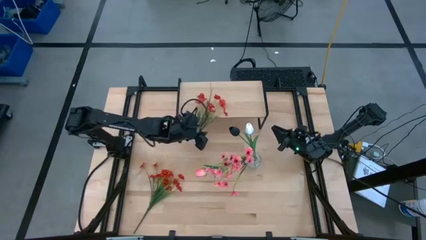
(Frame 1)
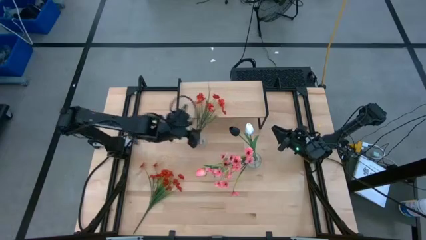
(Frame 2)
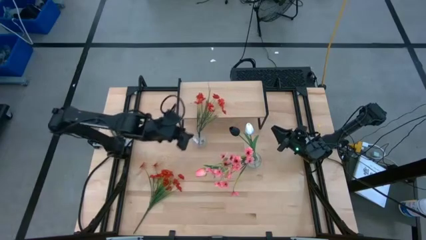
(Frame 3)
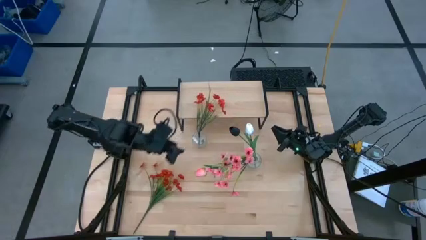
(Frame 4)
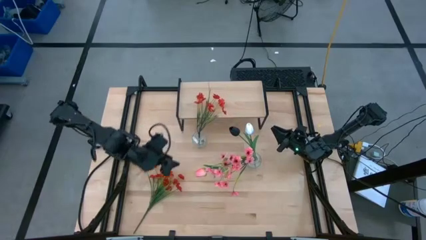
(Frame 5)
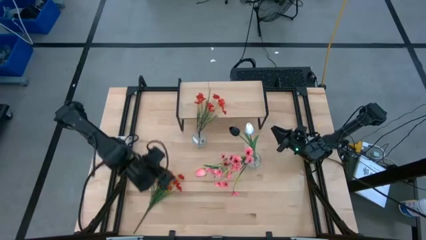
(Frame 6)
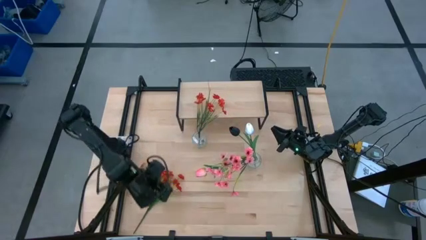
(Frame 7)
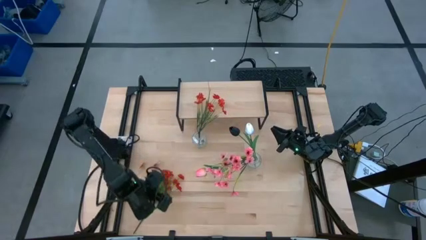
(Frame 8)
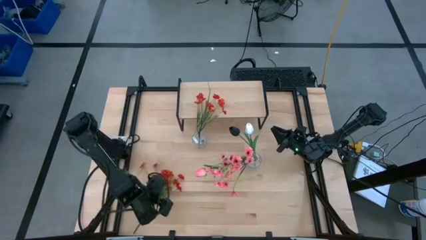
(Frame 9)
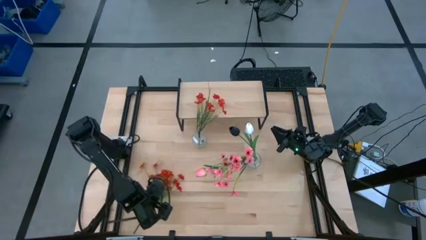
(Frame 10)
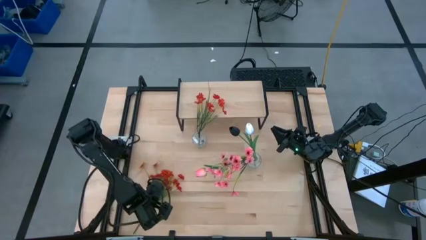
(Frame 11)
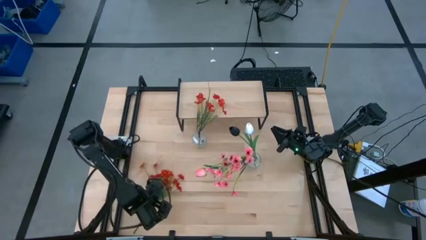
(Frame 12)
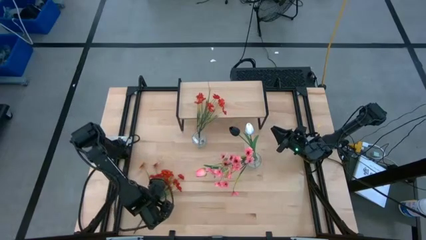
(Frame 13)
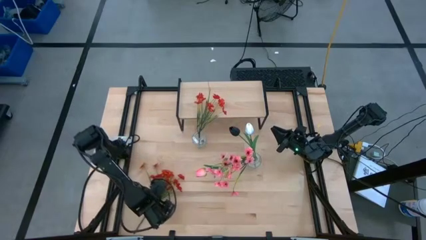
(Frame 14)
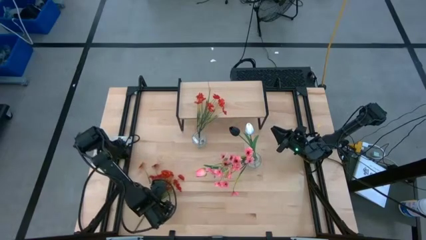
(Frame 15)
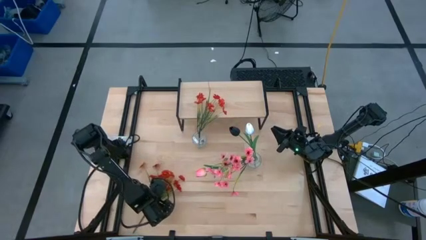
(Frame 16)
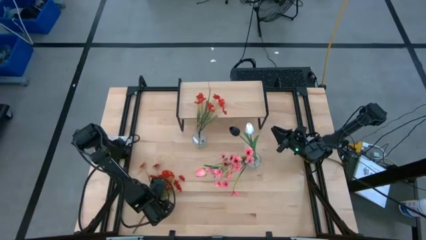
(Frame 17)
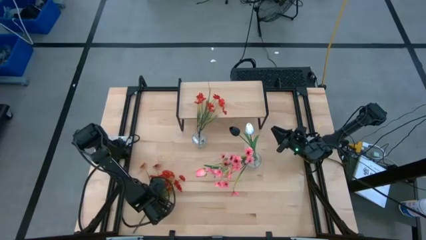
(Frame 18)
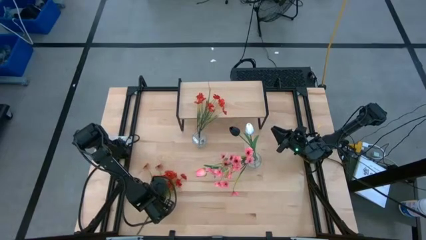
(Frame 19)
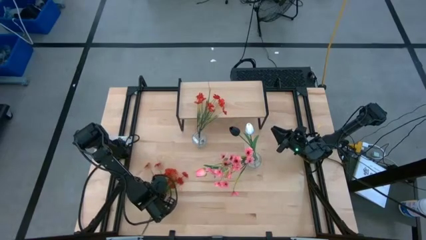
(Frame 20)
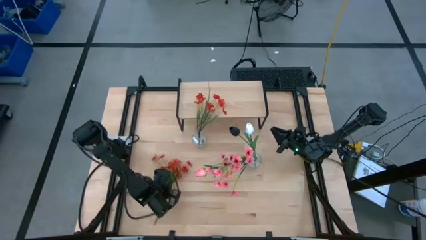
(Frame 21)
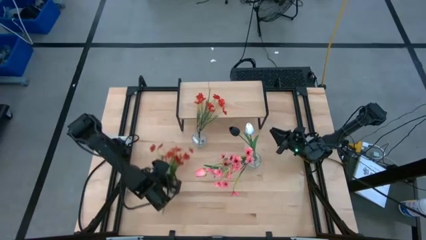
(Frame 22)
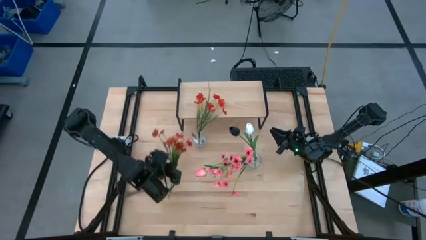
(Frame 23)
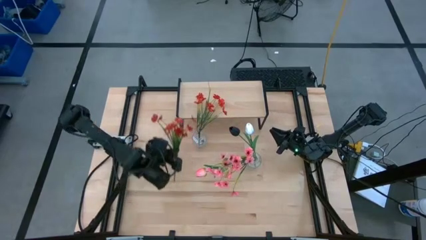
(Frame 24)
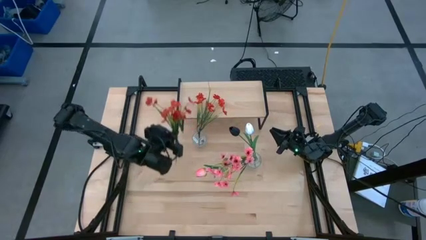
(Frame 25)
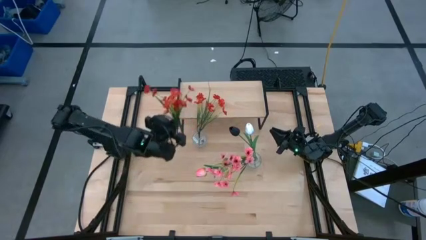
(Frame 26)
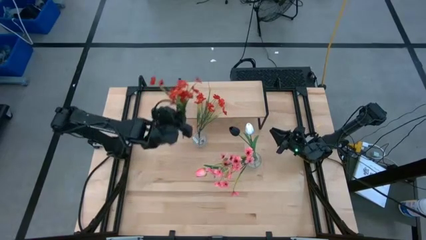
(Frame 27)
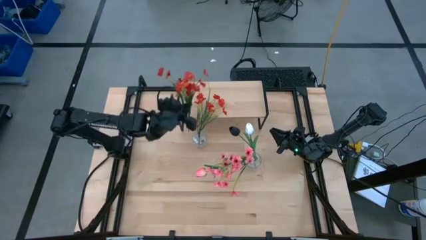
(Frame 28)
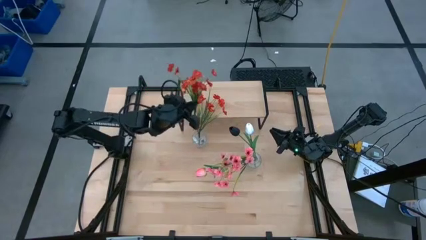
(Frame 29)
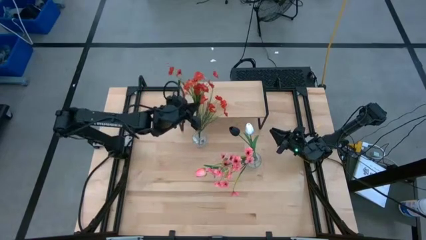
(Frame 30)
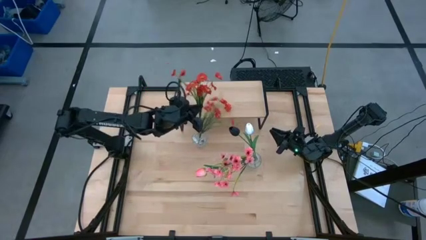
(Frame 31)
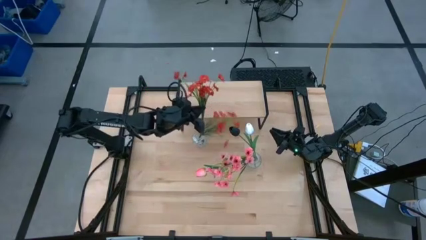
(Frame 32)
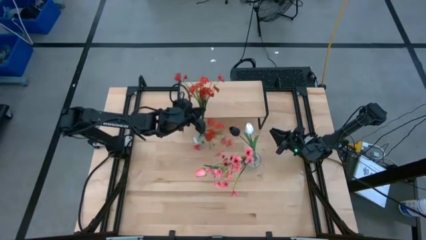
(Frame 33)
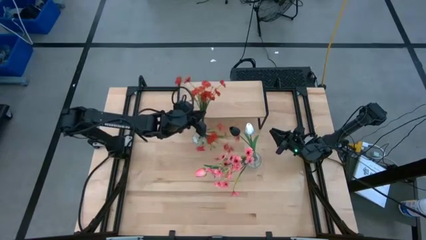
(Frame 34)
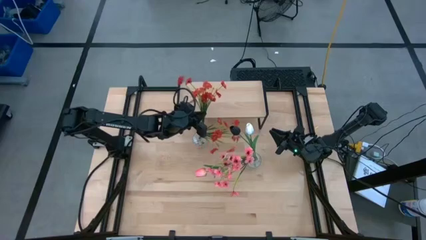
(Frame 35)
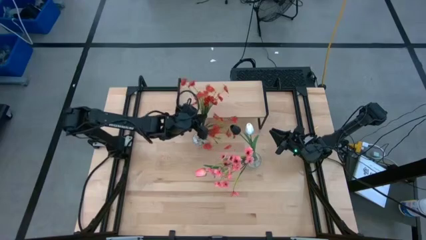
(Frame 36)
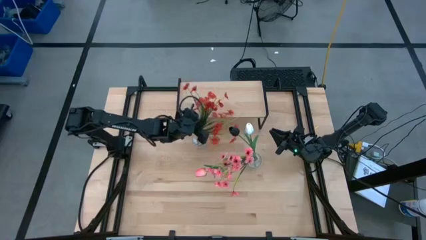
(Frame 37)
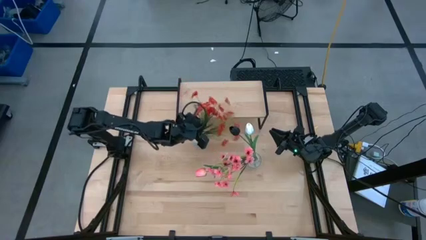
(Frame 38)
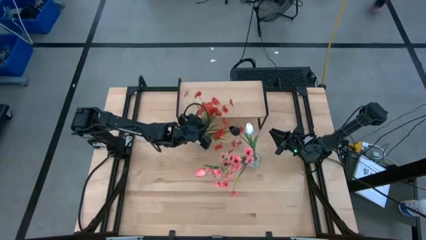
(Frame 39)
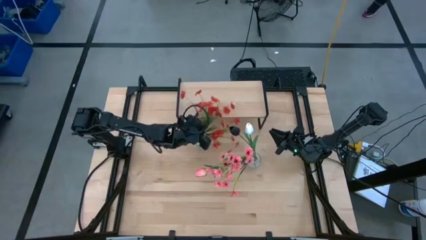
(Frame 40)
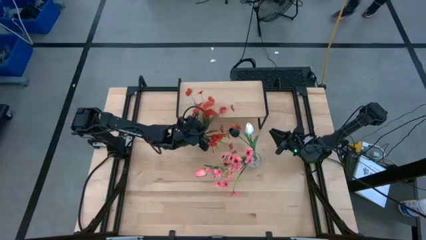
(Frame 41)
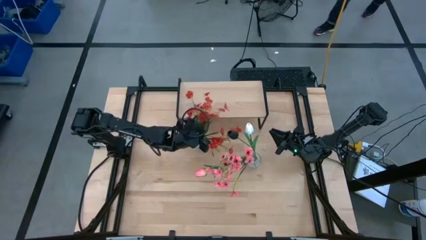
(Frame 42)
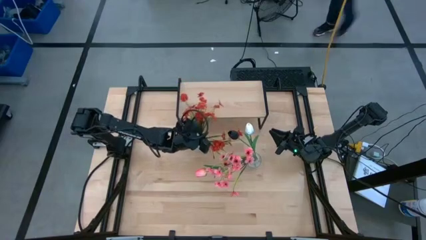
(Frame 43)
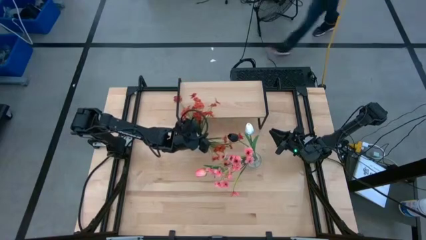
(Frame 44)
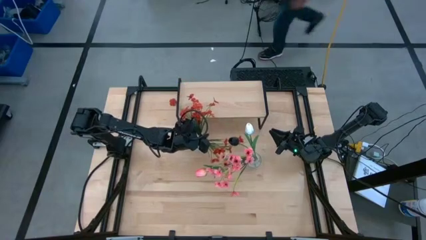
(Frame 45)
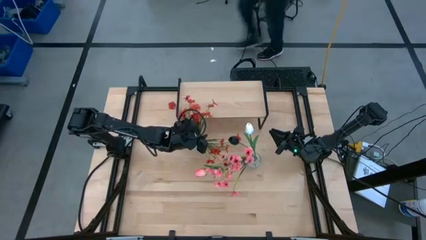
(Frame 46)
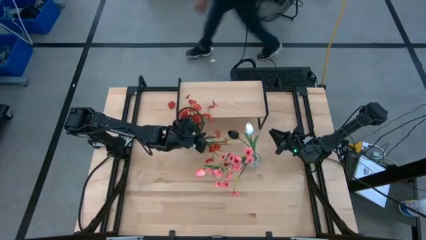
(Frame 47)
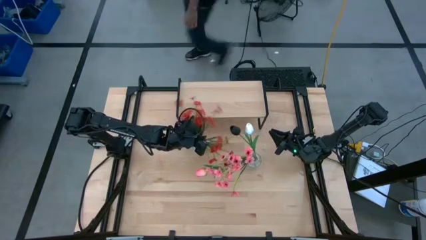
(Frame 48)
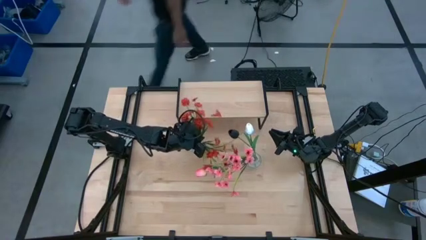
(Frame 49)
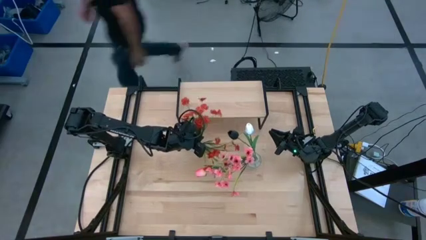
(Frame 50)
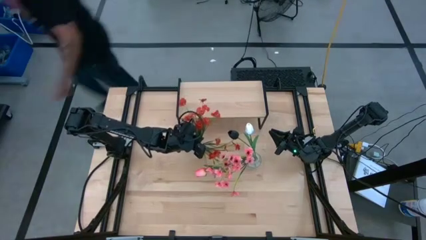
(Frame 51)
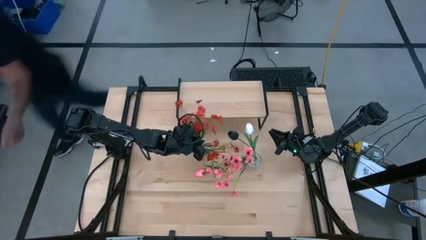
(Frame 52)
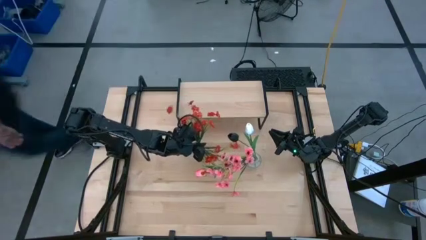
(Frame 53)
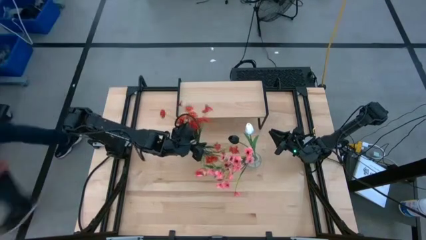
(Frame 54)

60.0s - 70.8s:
Task: Pick and place flowers into a vace then onto a shelf
Put the orange flowers into the left transparent vase
